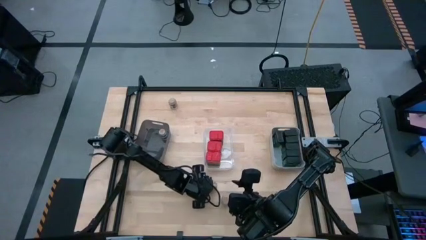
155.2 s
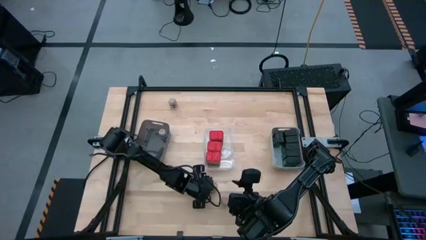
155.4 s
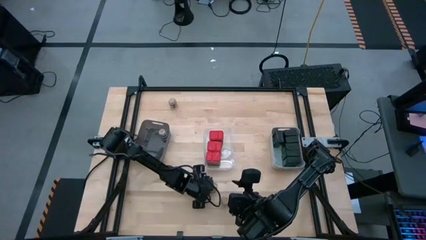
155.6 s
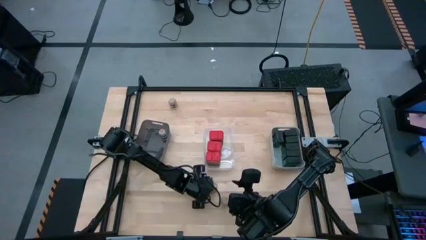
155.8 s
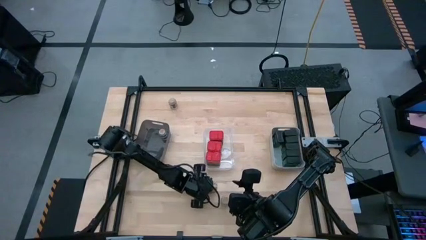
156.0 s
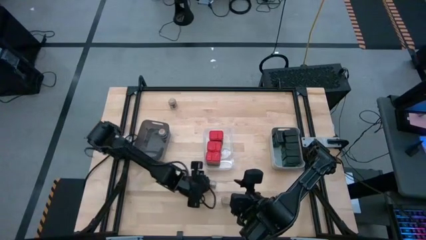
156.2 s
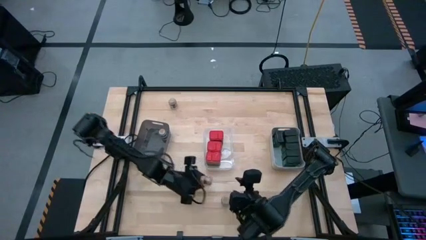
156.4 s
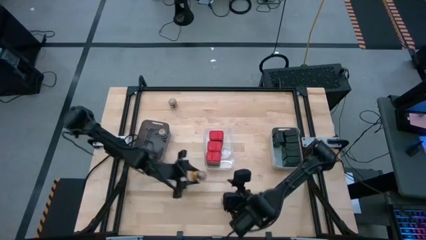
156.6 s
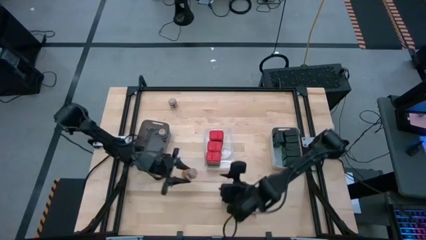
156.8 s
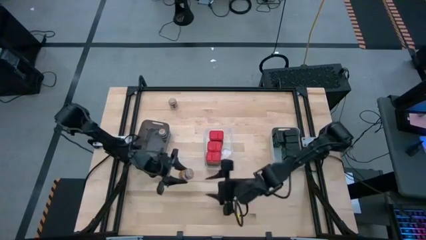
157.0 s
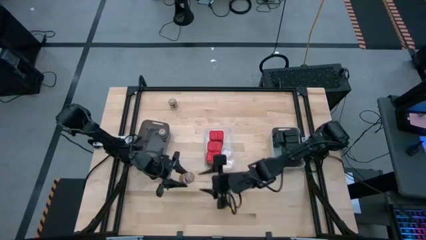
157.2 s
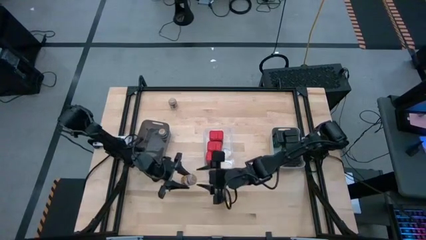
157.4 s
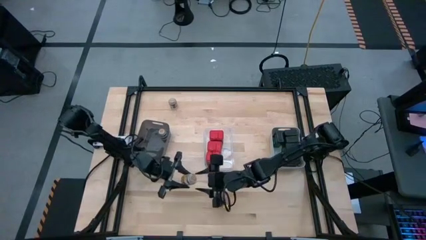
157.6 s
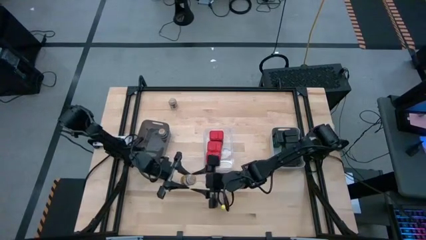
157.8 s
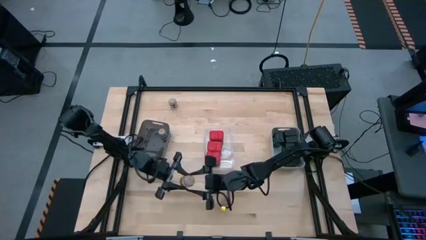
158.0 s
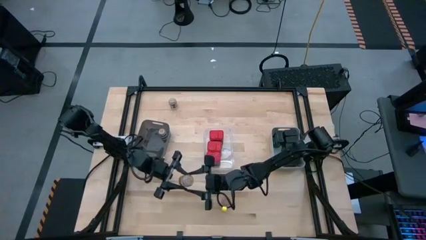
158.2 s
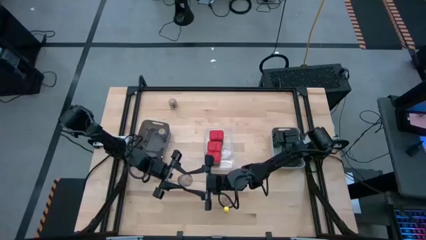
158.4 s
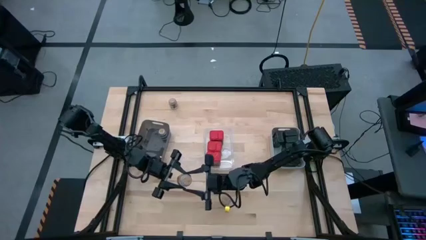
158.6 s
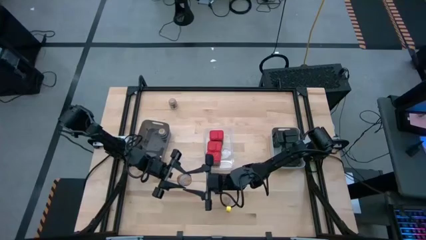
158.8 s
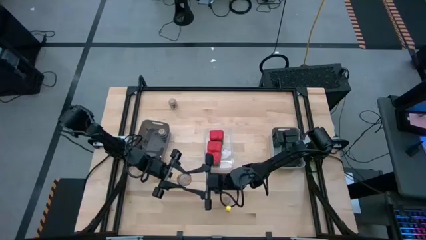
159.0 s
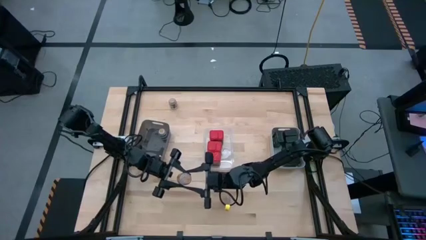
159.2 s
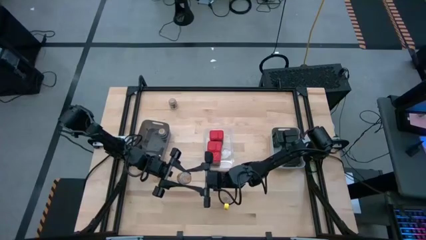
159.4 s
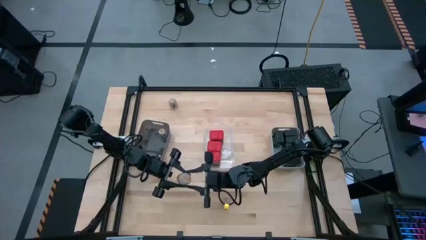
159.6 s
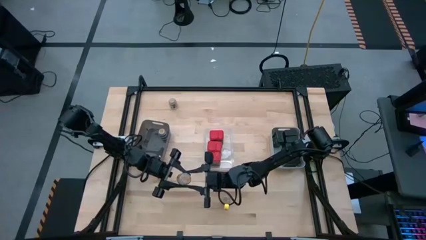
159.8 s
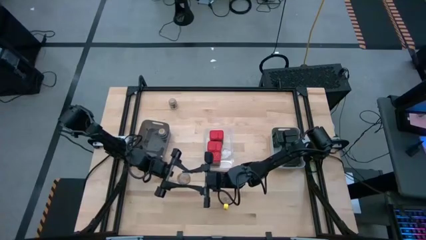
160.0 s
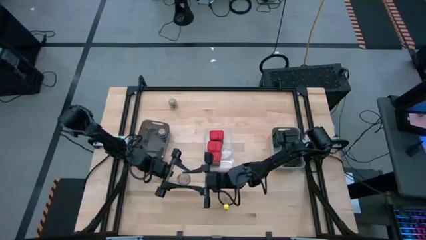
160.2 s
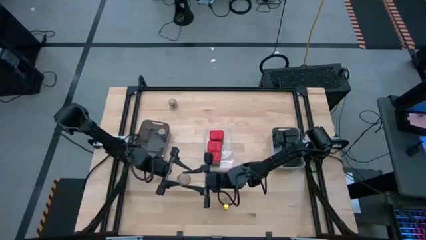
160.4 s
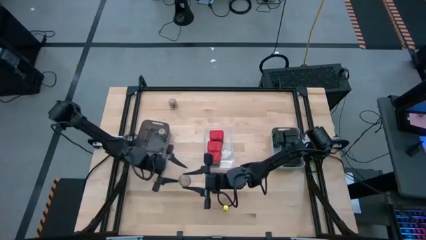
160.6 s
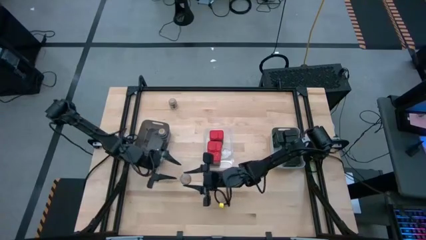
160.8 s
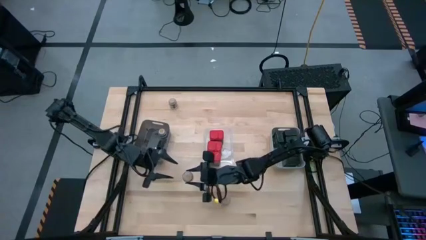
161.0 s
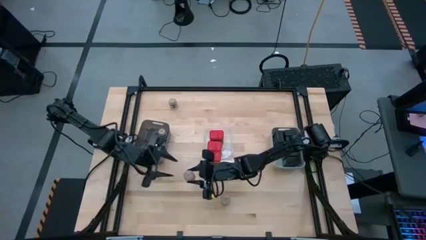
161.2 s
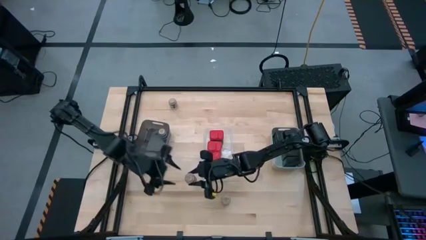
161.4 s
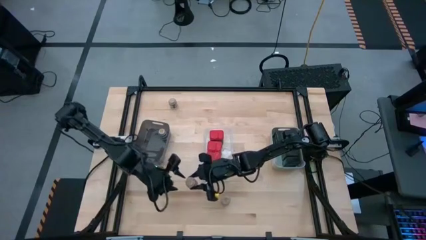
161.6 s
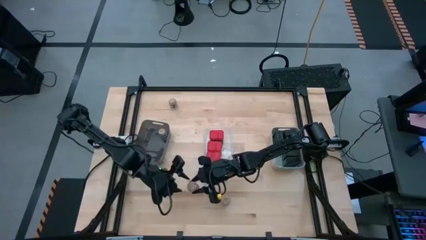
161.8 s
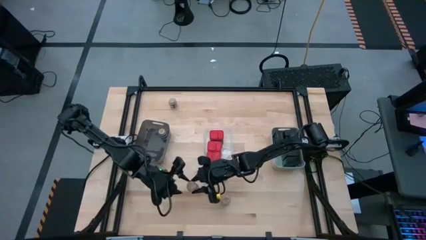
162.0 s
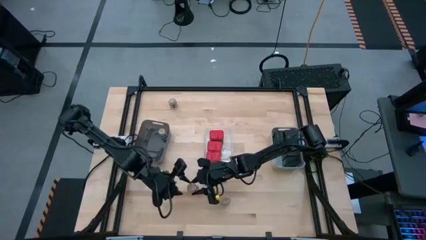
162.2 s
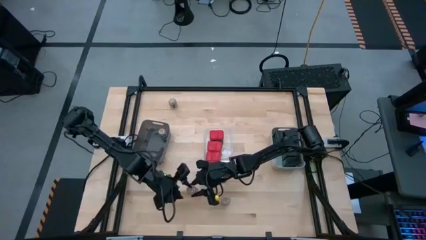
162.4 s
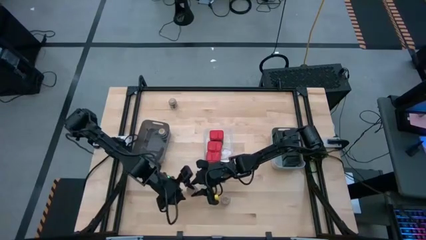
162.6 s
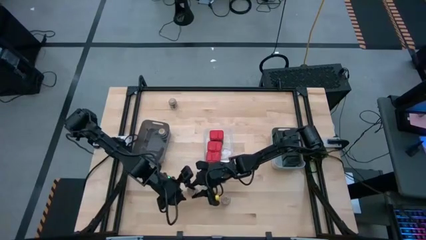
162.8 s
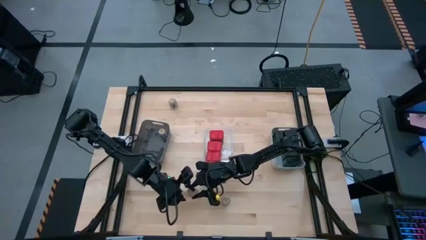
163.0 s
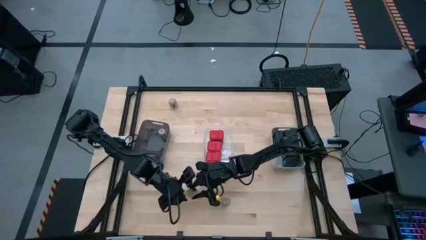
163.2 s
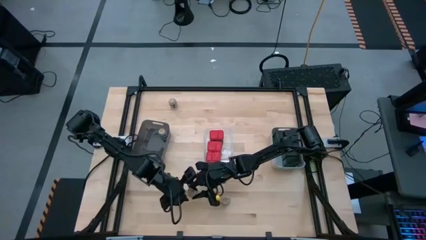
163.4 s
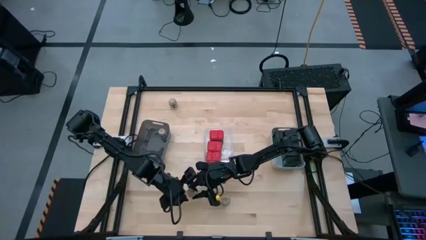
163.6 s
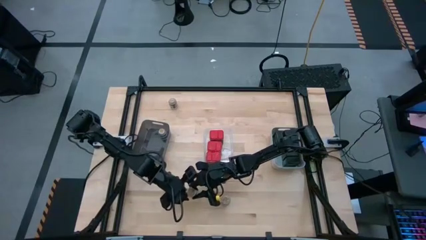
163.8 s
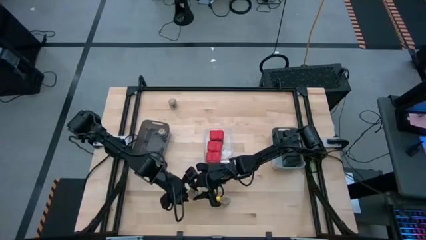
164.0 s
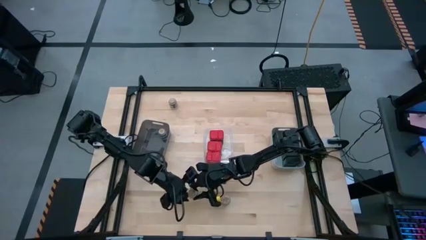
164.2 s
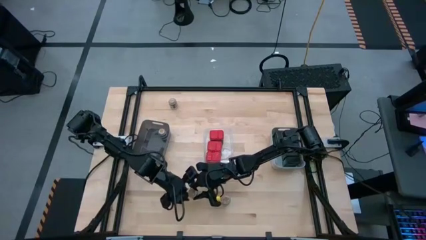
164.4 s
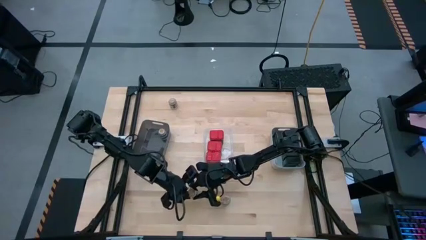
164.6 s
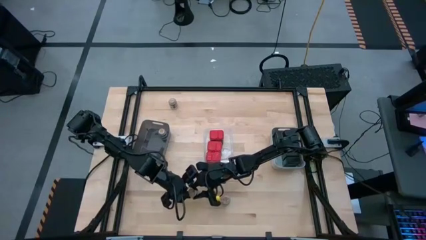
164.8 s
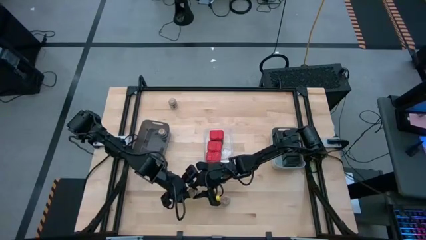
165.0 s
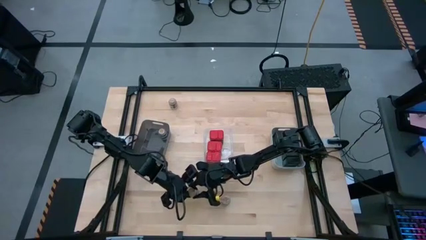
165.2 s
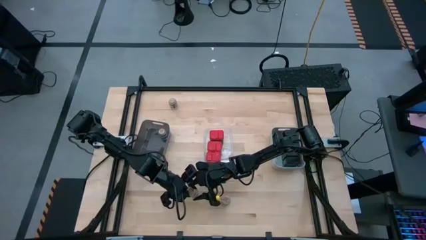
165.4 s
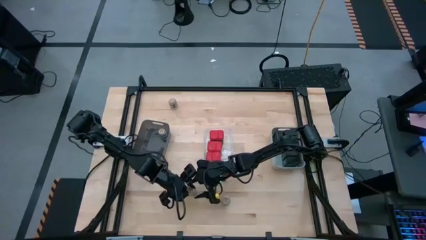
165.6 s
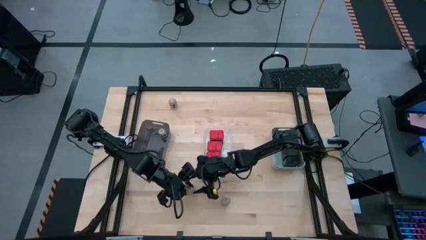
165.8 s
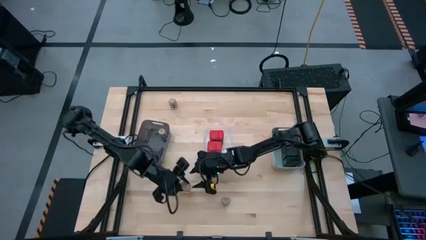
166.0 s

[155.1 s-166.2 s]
Task: Sort spices by type
Put the brown seasoning can into the black bin
